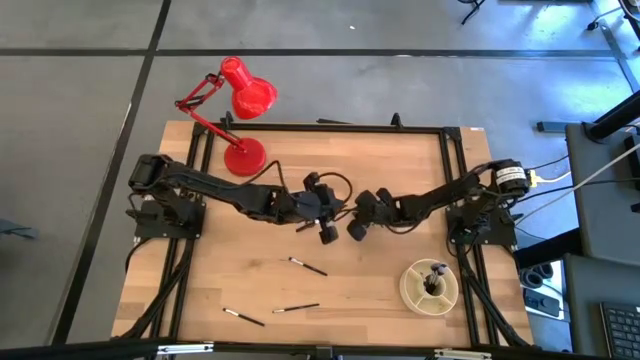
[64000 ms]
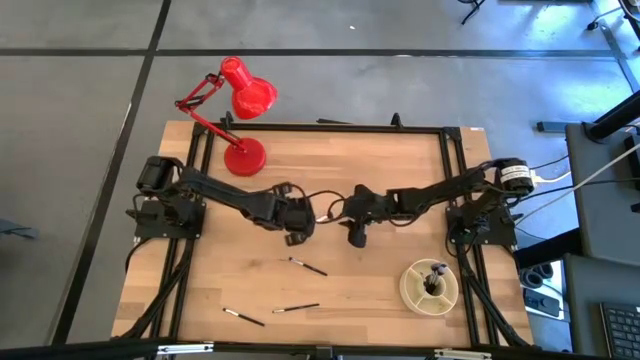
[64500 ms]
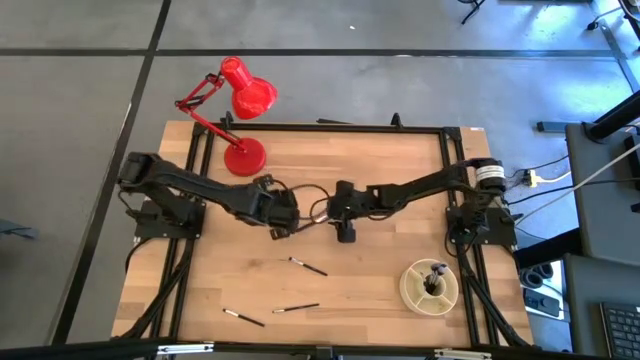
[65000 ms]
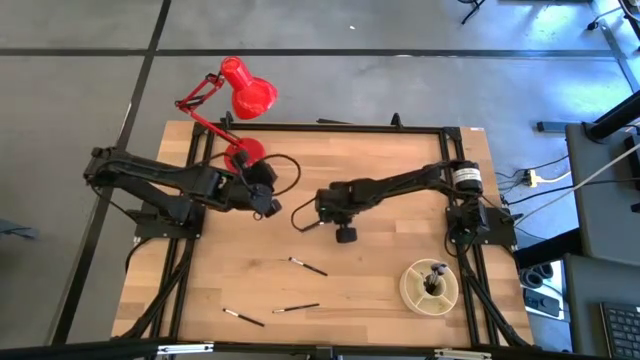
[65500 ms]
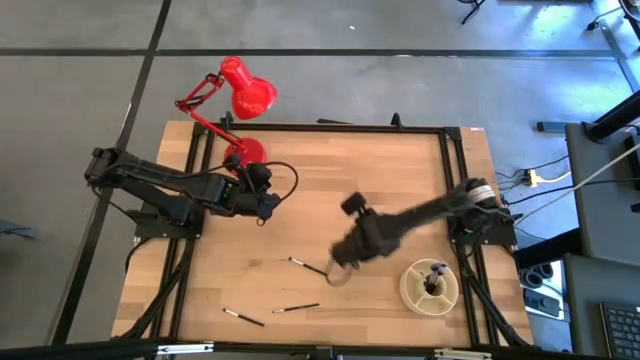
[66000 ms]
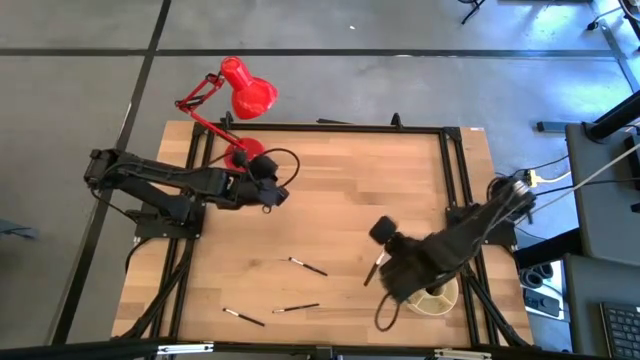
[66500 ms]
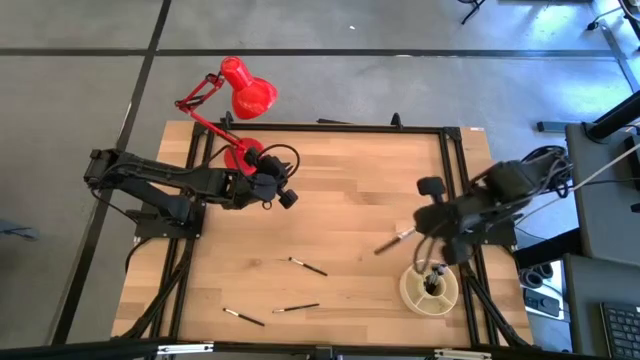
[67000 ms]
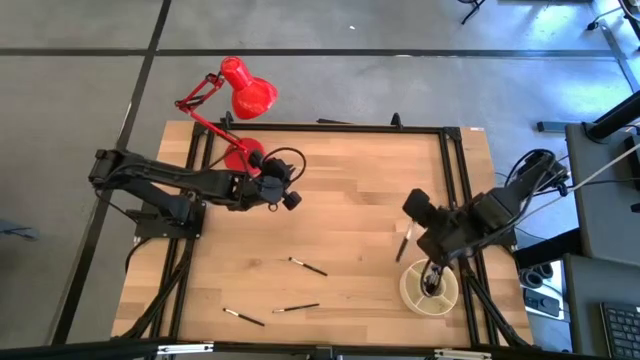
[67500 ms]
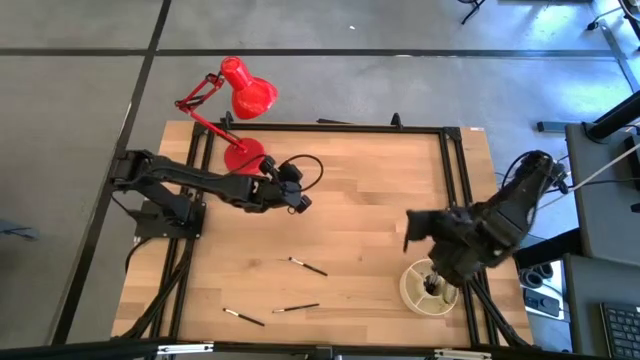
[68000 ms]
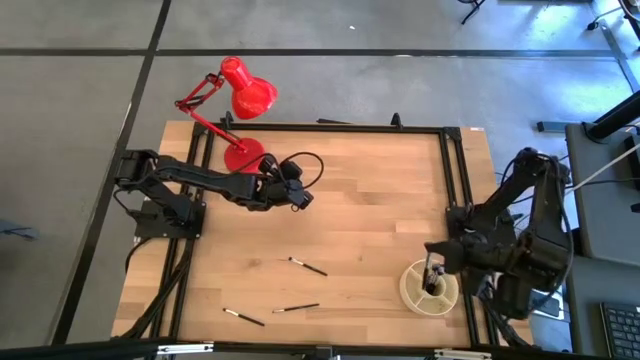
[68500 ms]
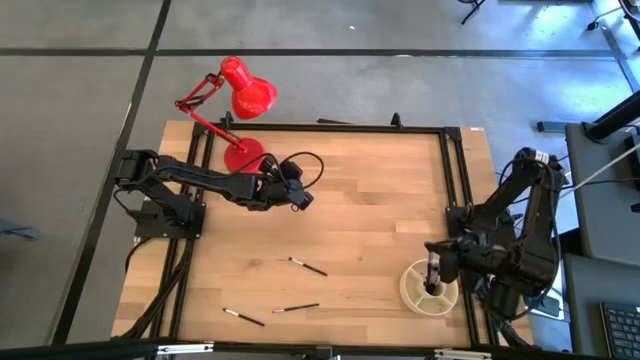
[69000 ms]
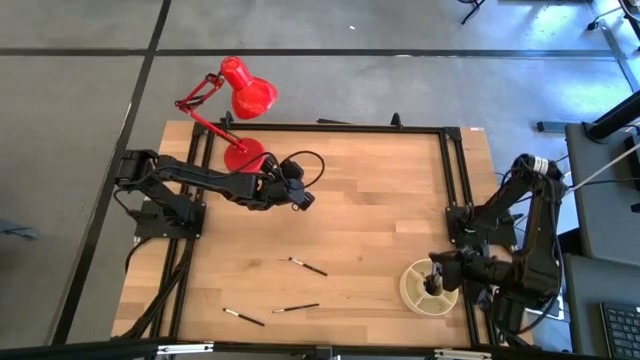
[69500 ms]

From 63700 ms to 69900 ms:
Task: Sort items
Put the powder brush into the brush organizer

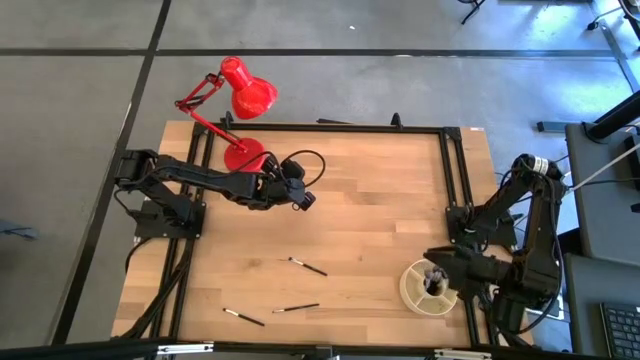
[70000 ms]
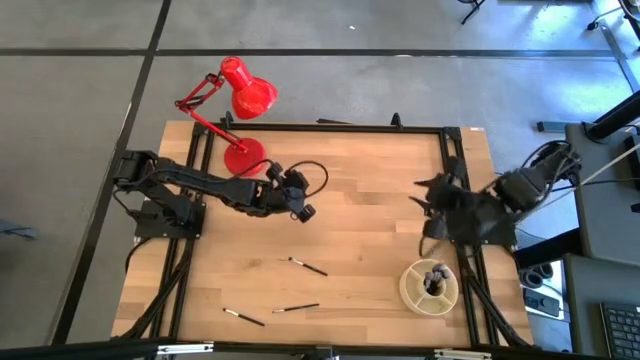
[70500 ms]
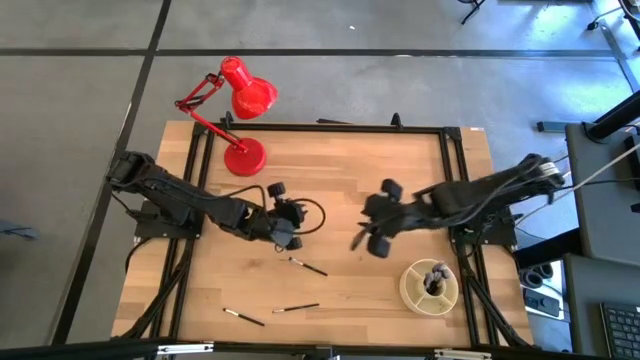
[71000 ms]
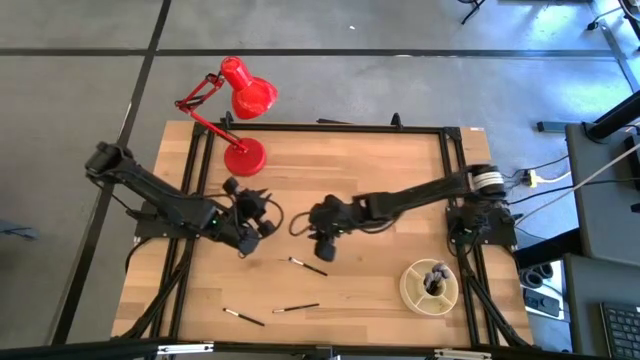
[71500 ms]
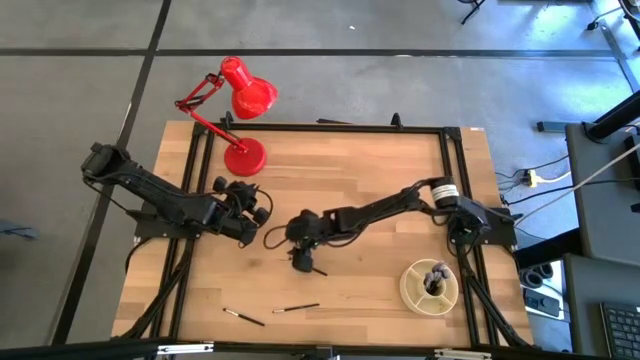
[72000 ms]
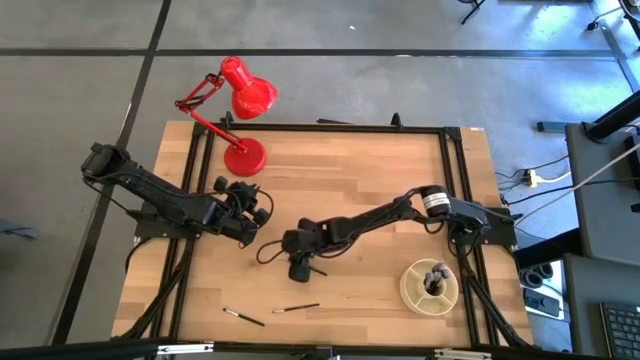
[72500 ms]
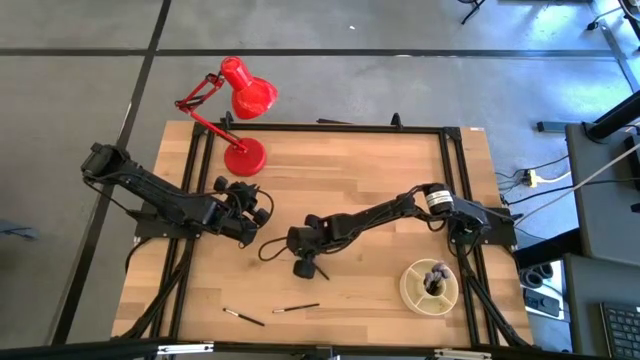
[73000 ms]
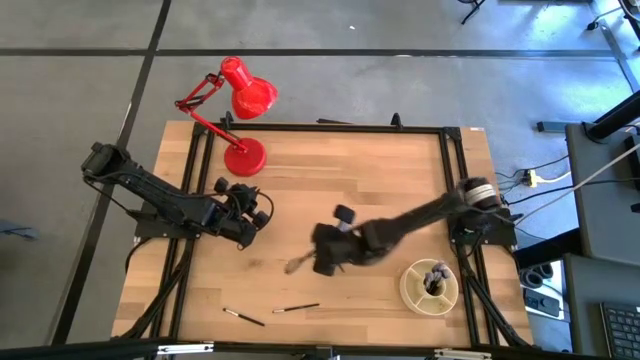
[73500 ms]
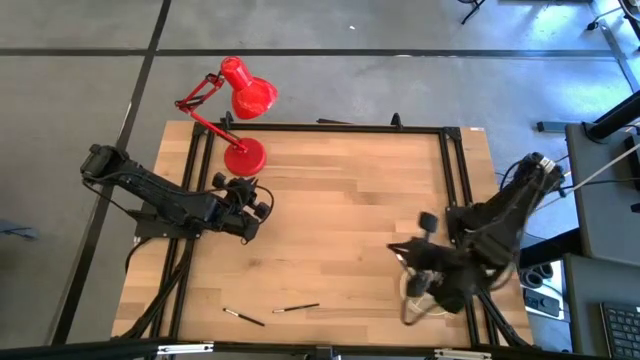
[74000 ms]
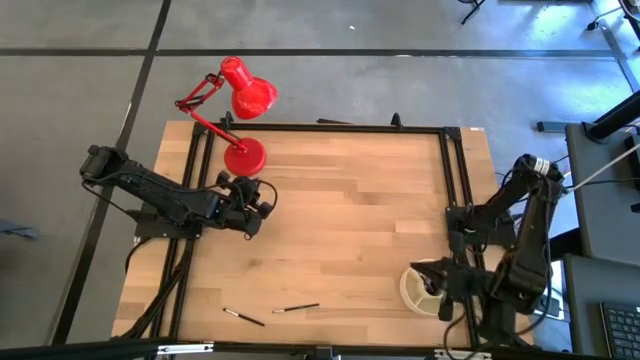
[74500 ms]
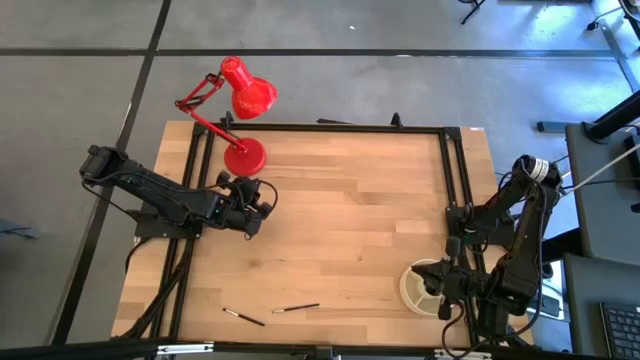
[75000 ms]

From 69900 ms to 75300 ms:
Put the eyeshadow brush into the brush organizer

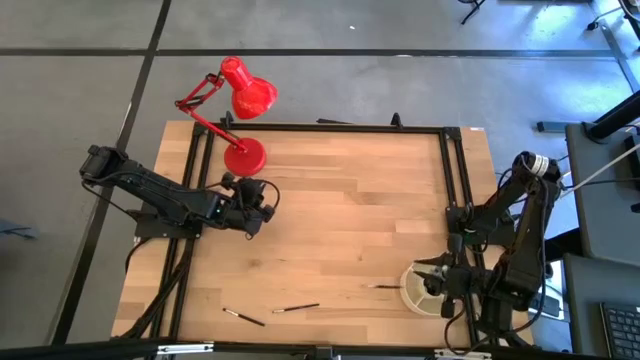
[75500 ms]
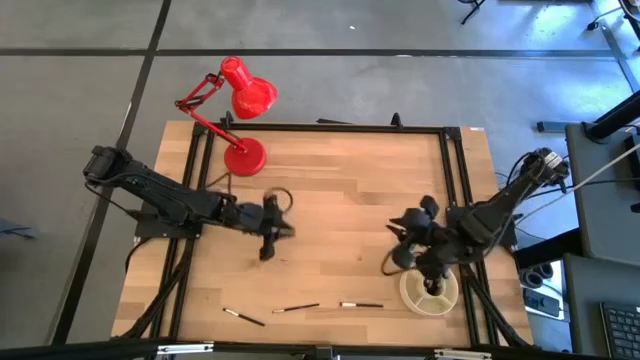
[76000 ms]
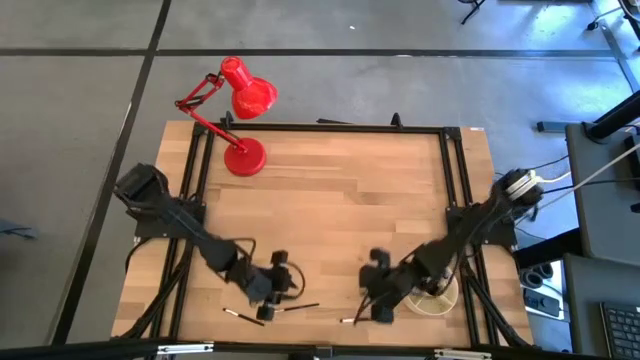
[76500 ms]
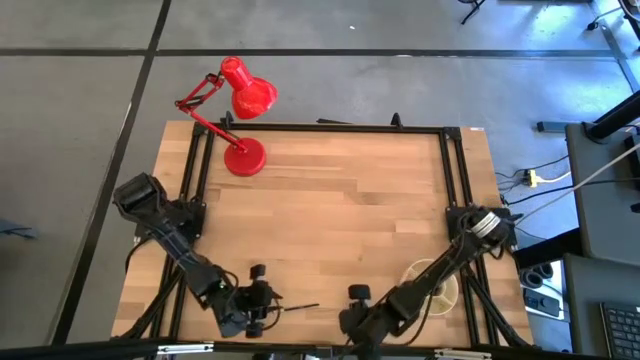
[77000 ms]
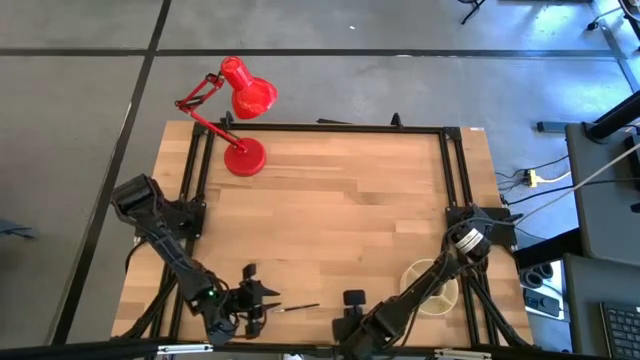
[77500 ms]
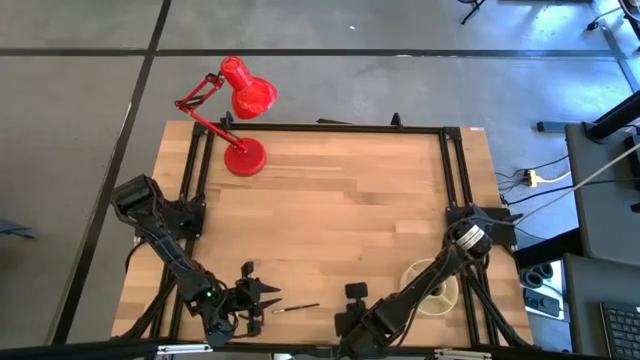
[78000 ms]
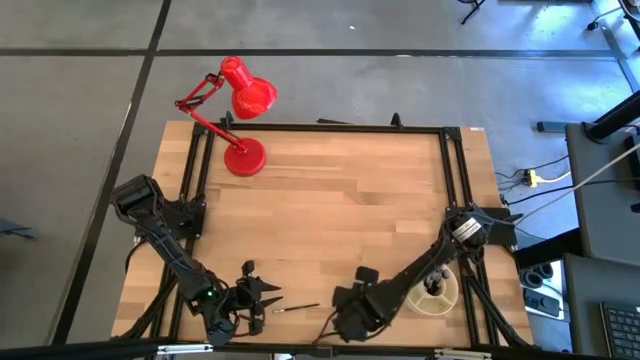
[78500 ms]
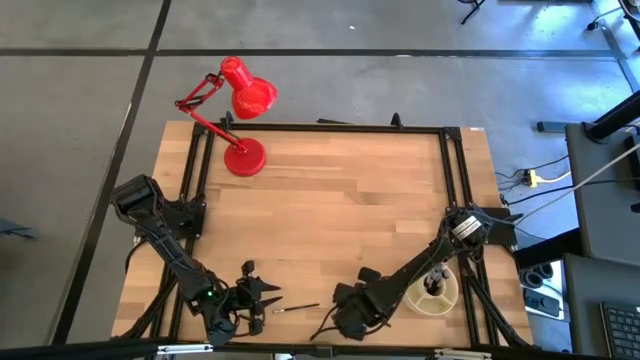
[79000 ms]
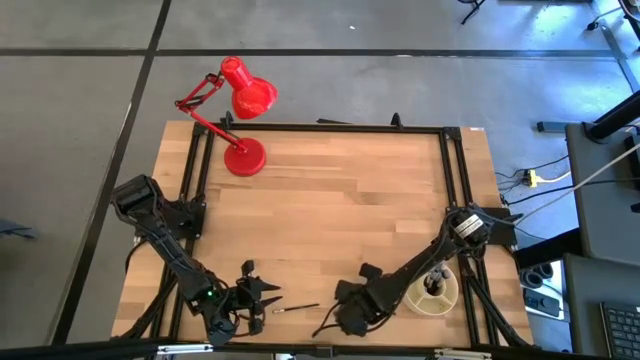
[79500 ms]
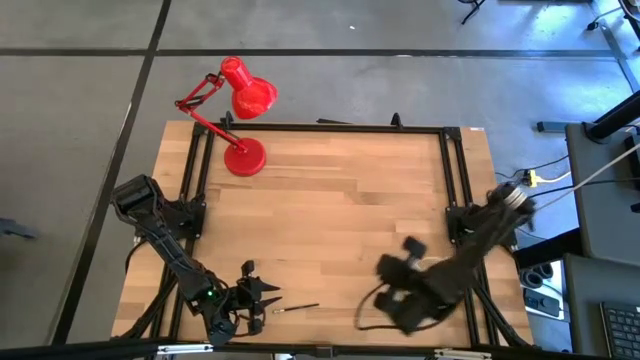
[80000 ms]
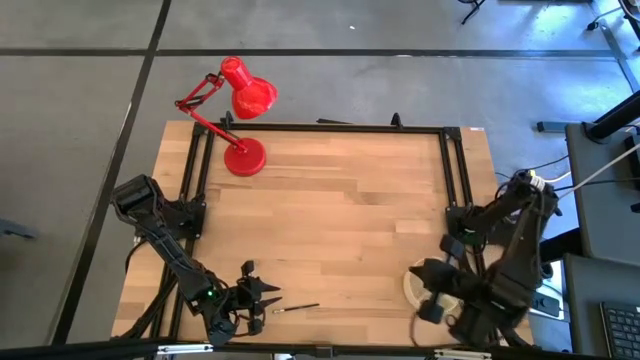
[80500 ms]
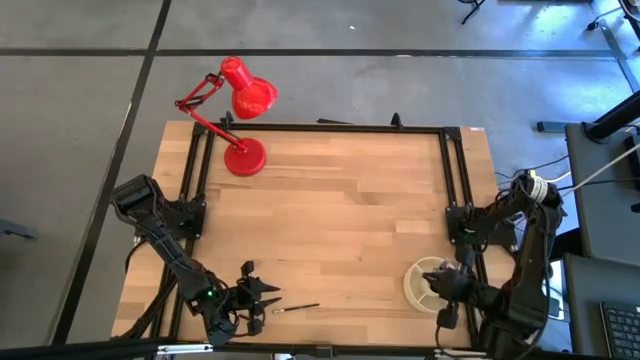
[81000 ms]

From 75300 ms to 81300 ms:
Put the eyeshadow brush into the brush organizer

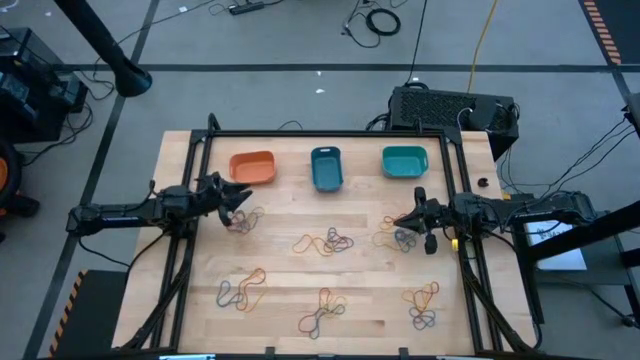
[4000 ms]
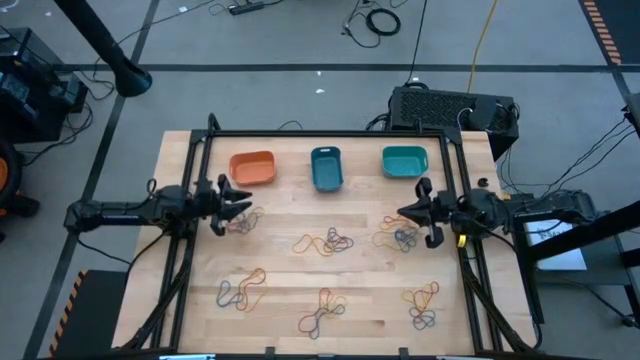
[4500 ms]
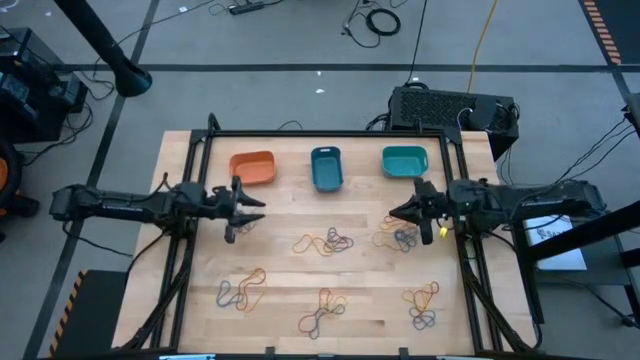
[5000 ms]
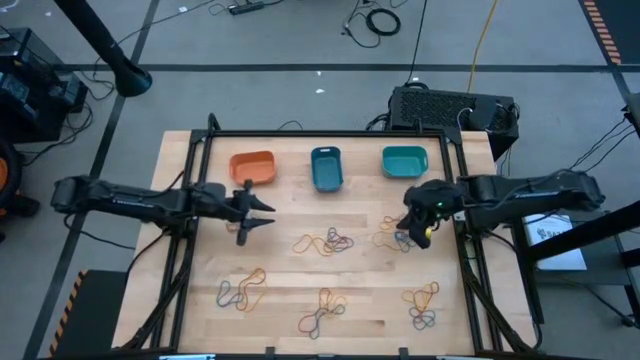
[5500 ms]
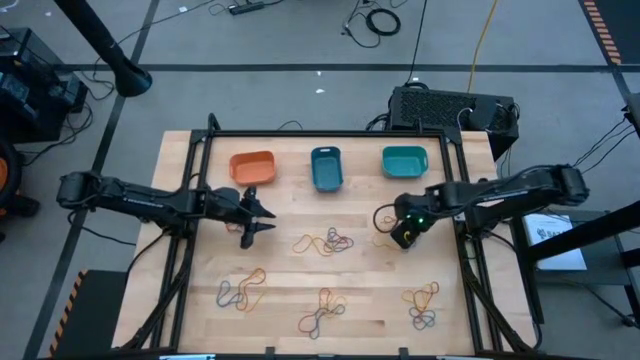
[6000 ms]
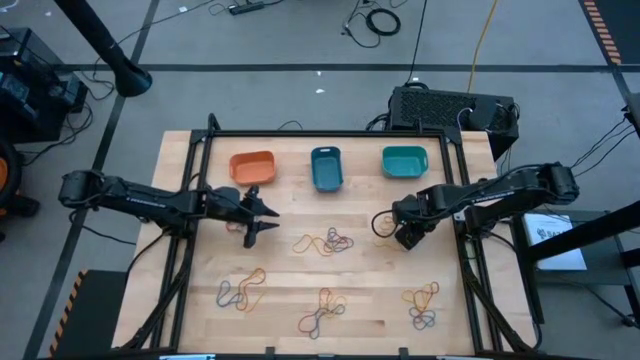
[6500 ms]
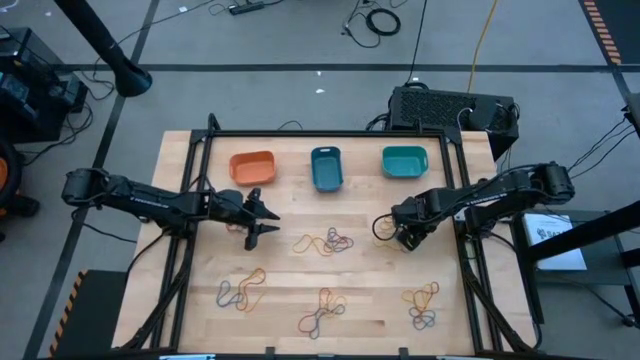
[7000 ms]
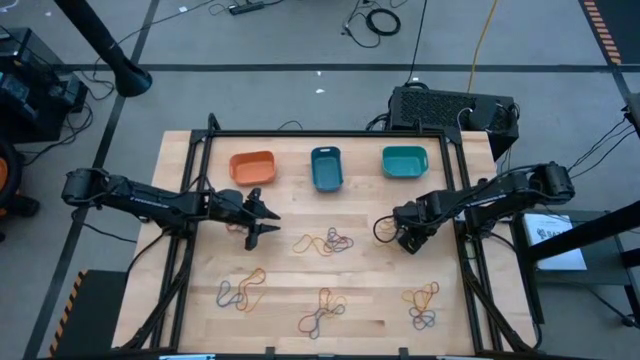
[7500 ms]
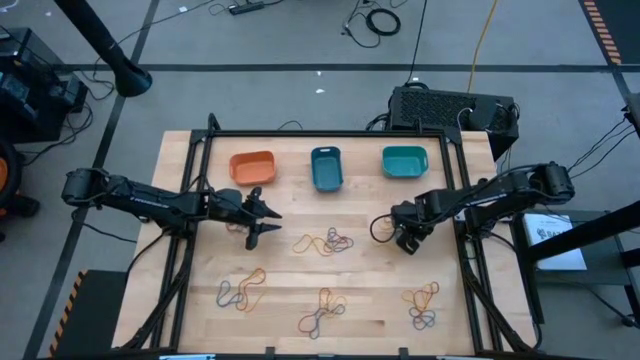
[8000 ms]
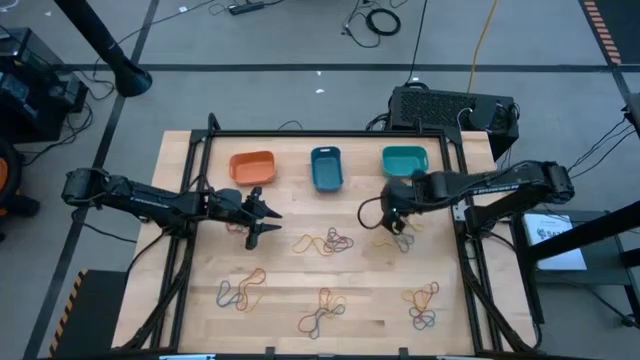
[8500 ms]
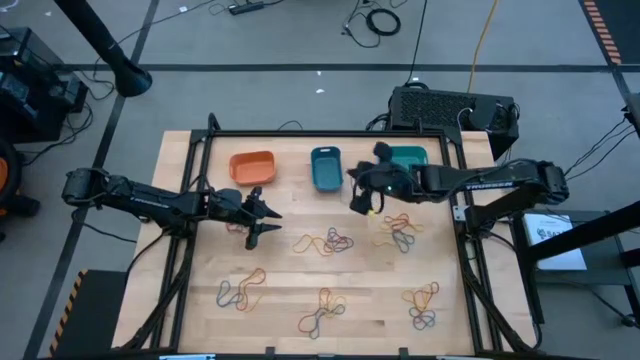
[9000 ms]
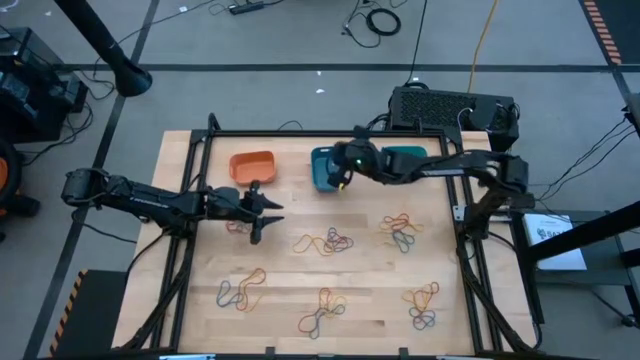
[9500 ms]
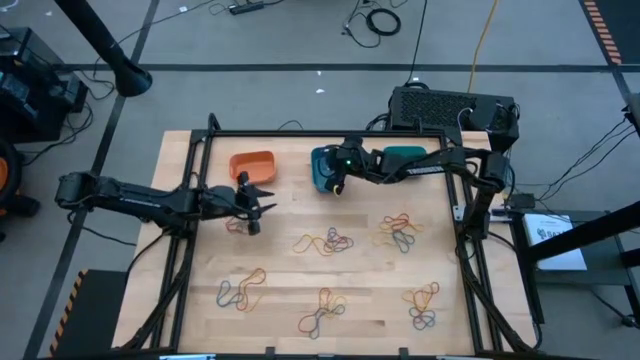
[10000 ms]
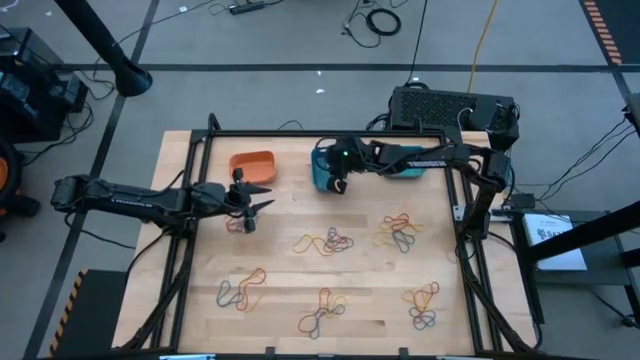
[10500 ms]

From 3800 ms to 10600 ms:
Task: Sort rubber bands into baskets
Put the blue rubber band into the blue bin
